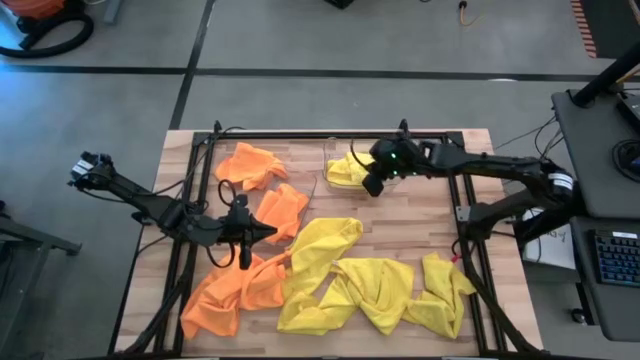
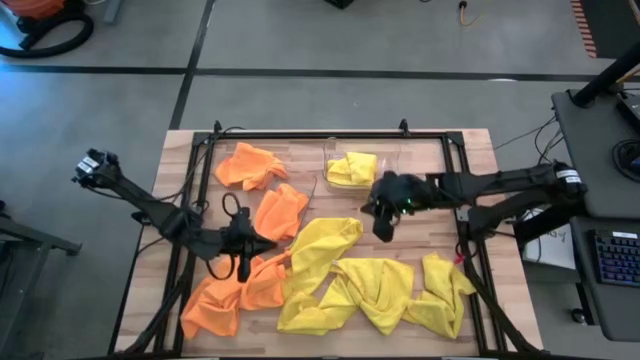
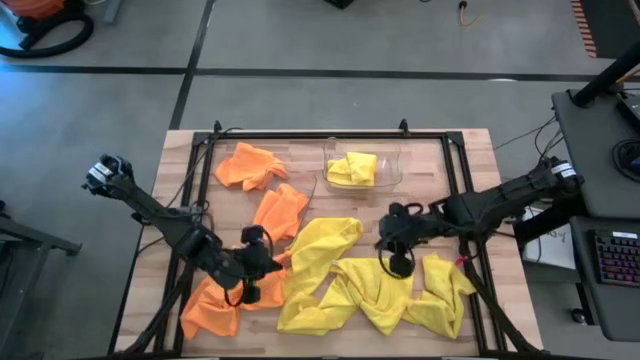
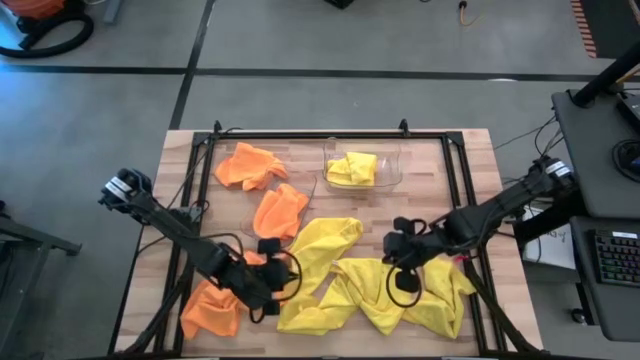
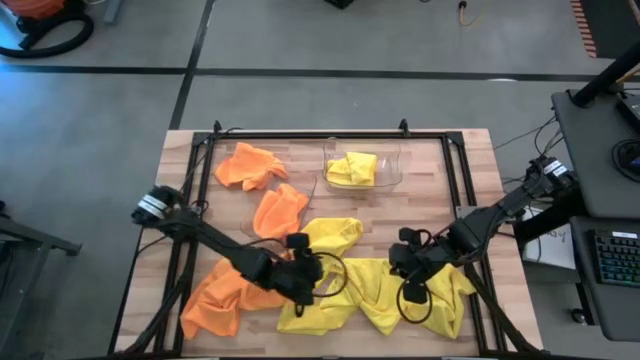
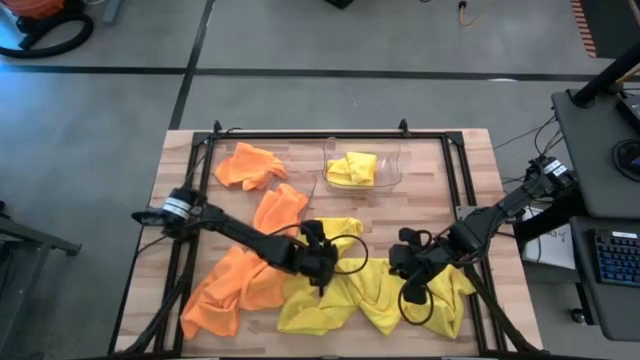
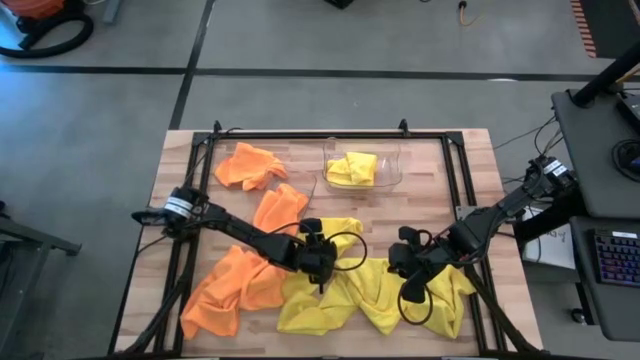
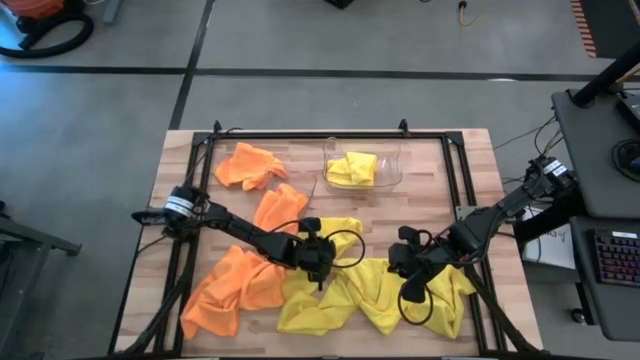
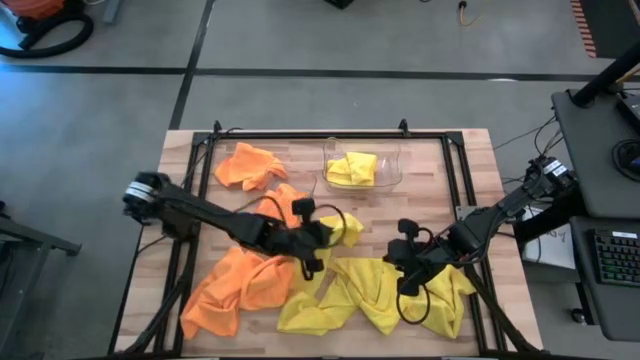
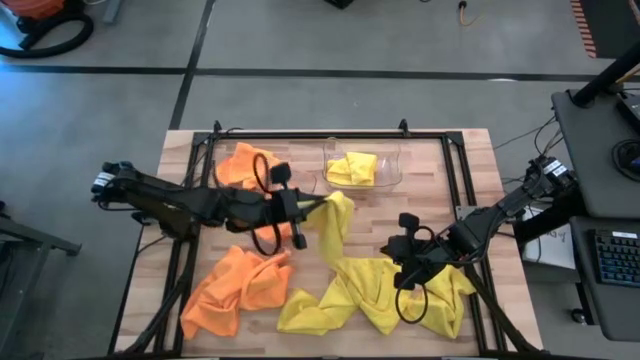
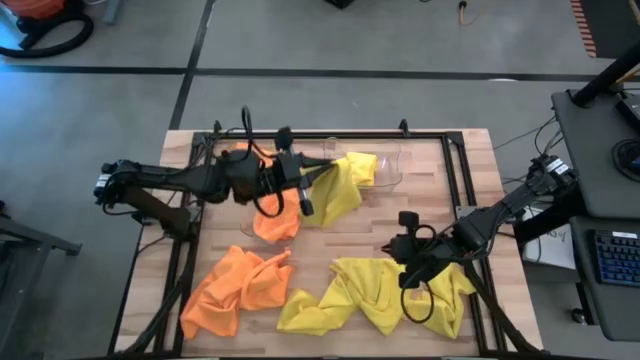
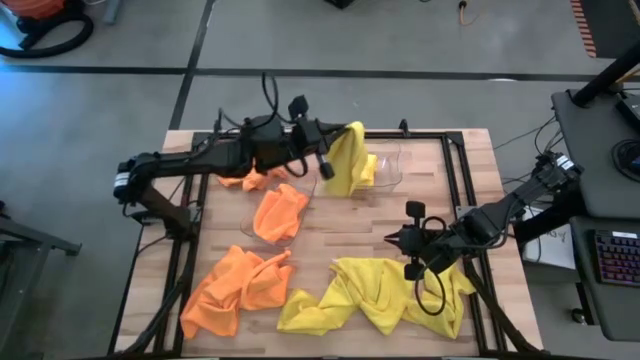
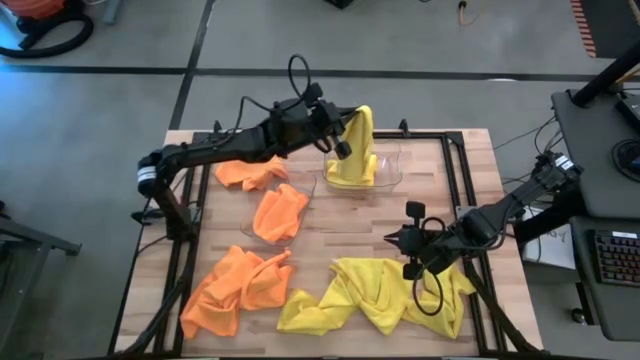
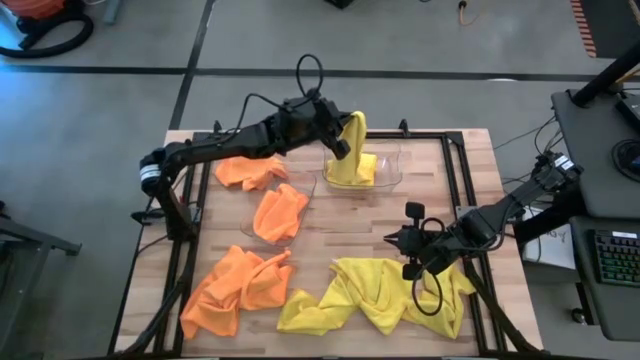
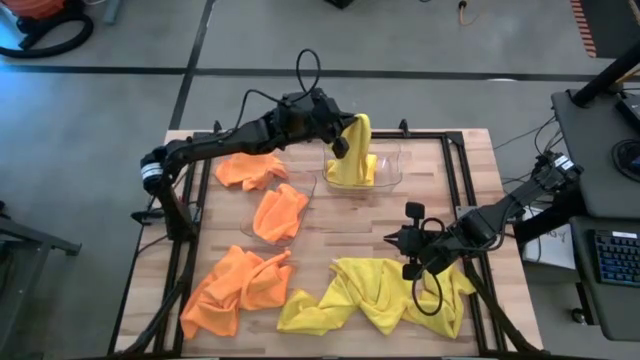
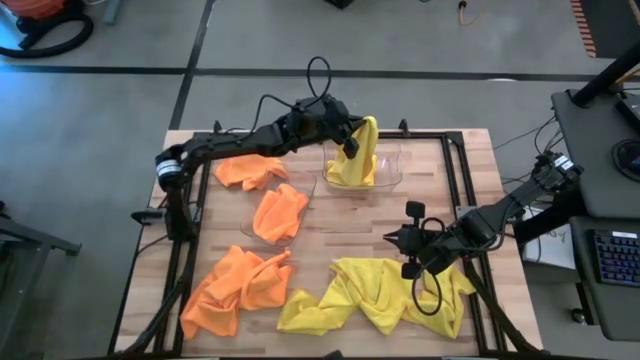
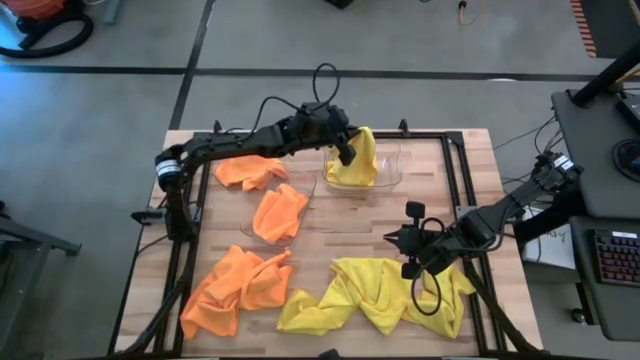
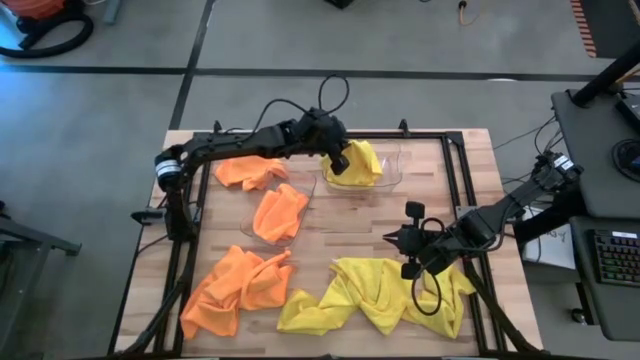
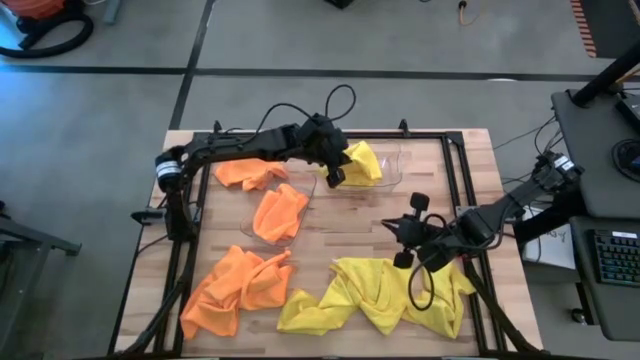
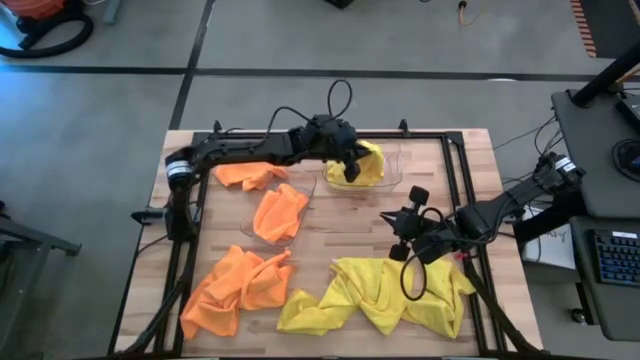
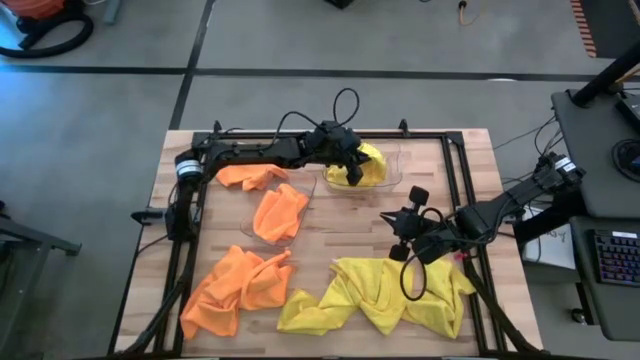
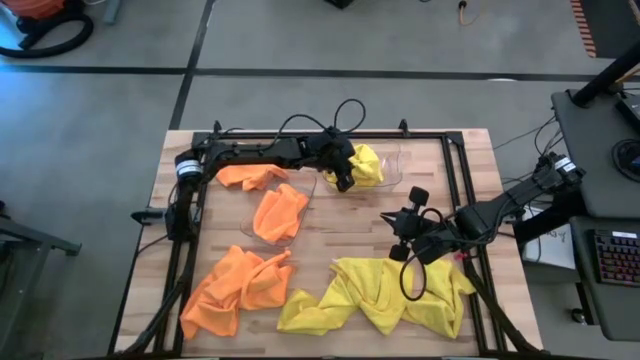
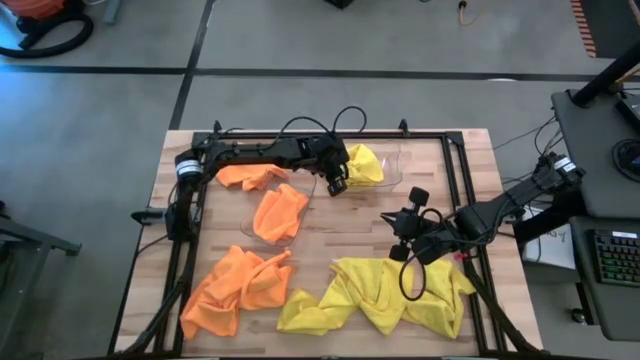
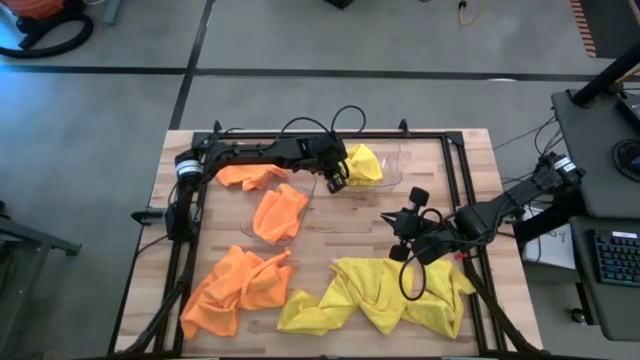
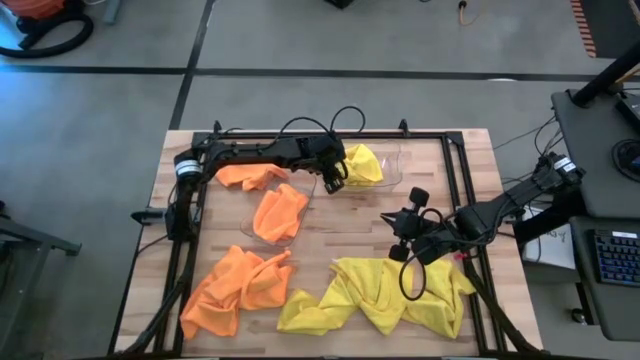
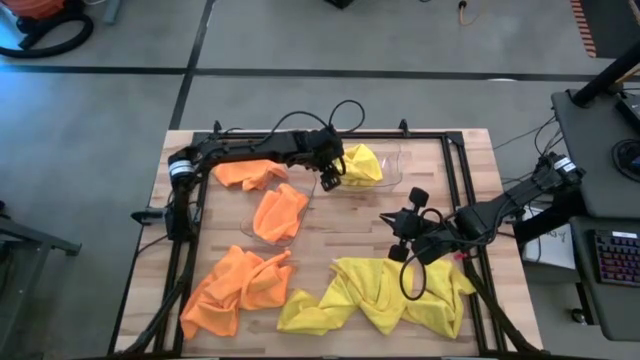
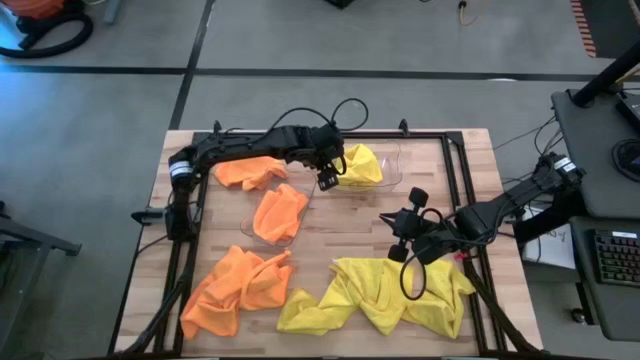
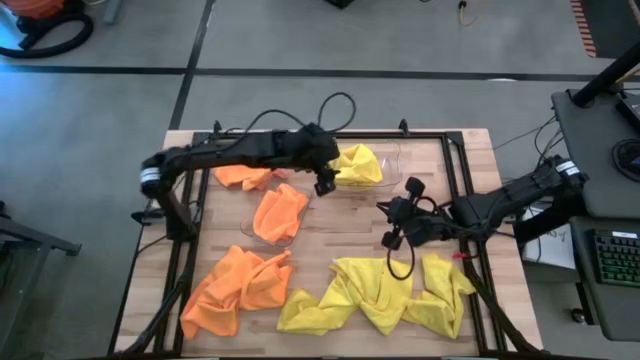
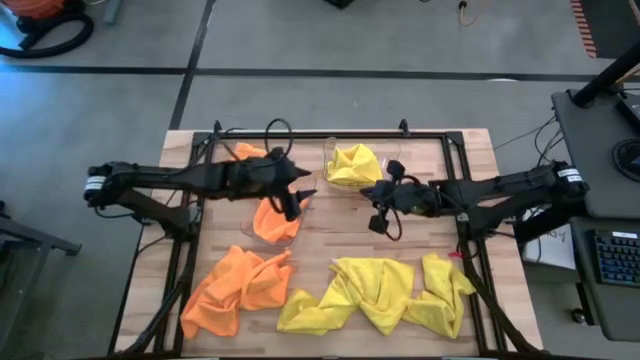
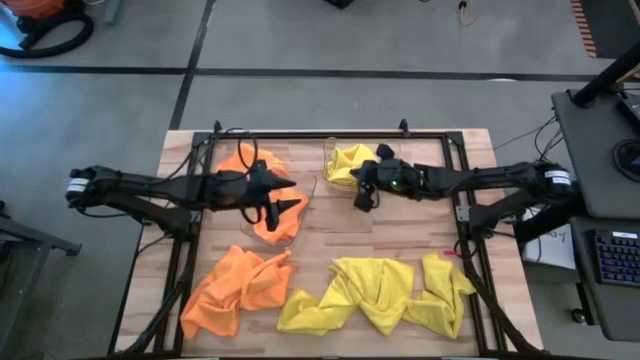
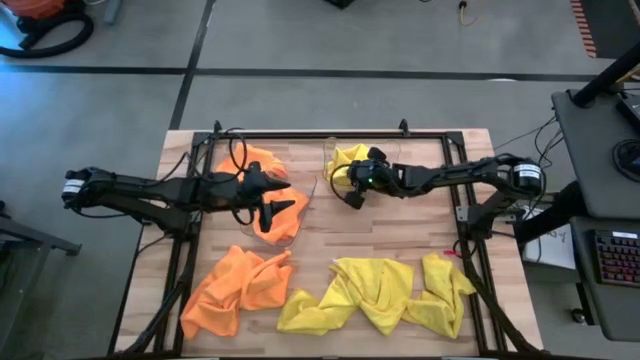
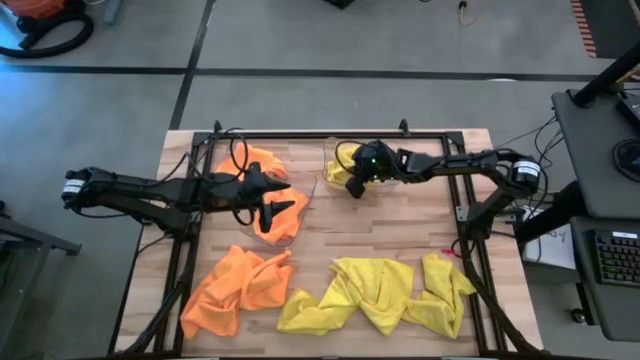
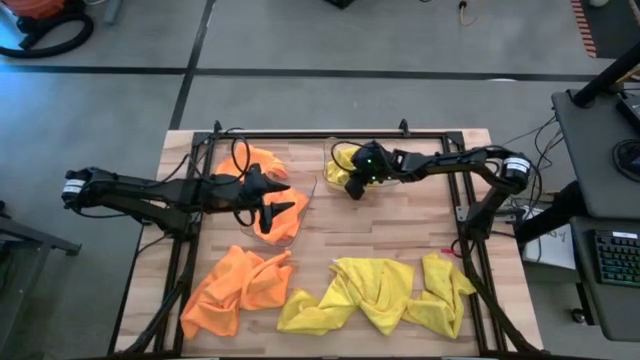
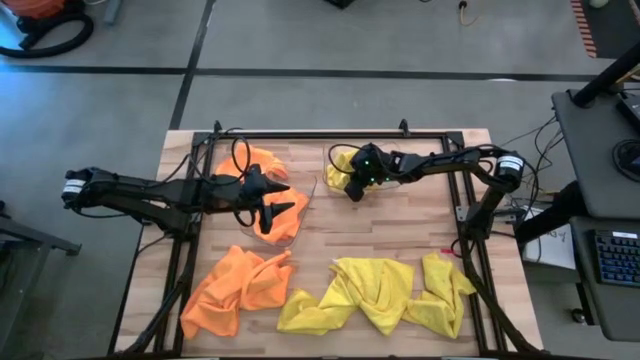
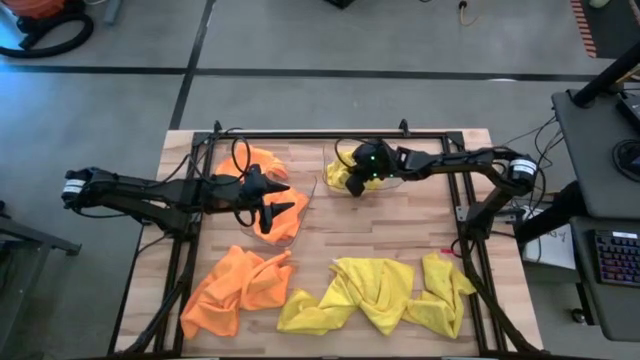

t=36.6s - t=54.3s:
Task: Sort microfiber towel by color & place in baskets
Put the yellow microfiber towel into the right transparent bin

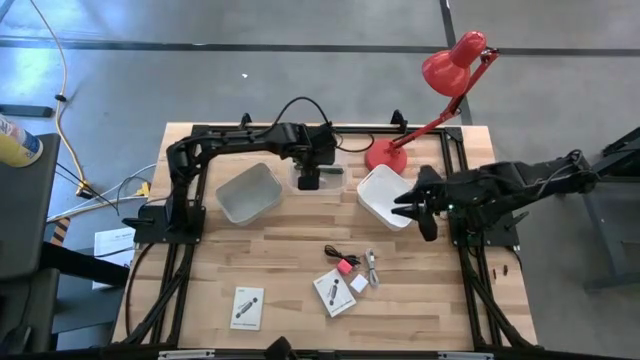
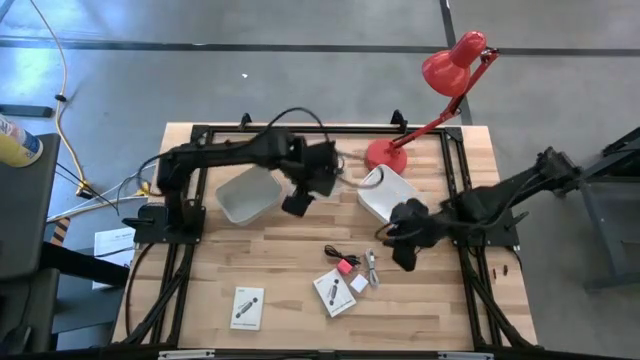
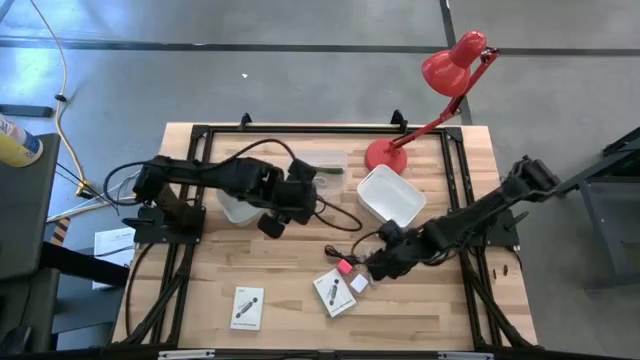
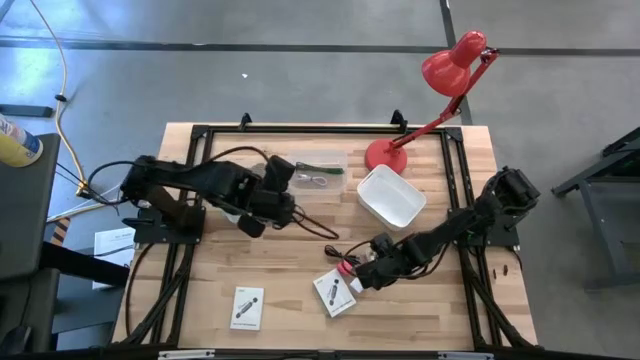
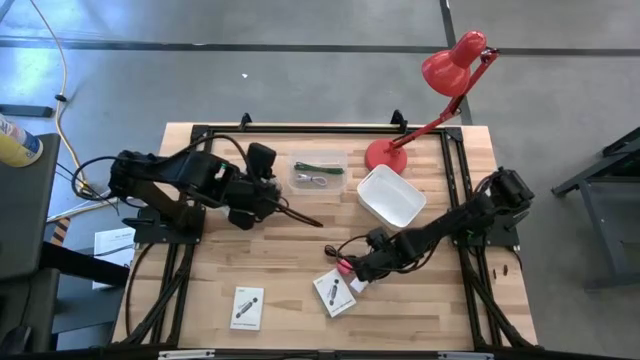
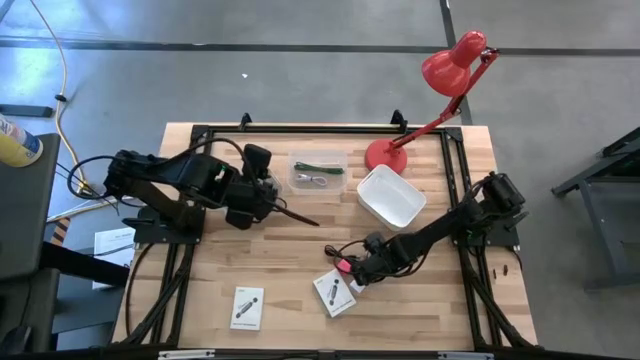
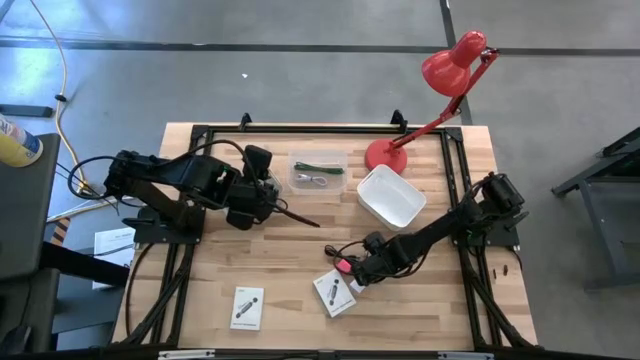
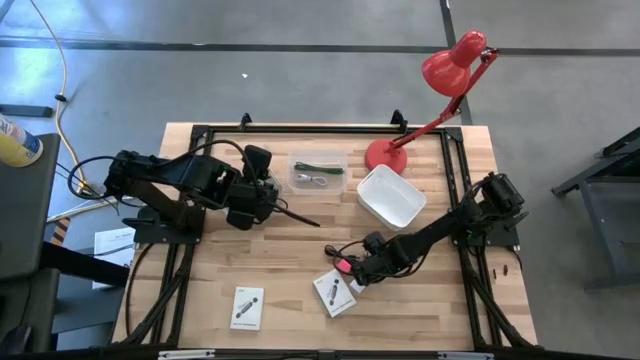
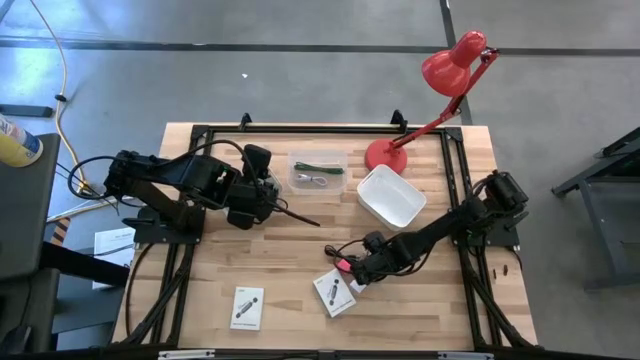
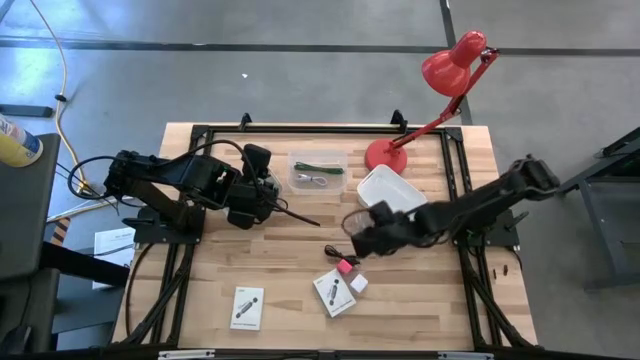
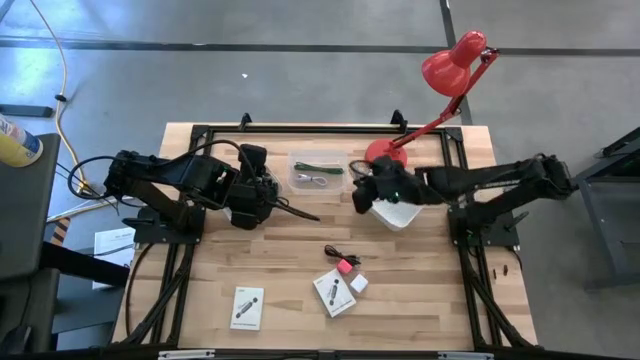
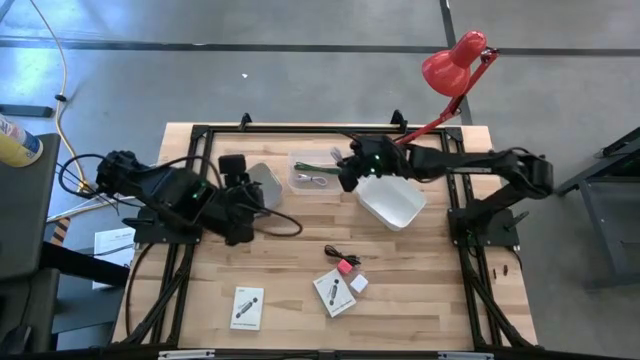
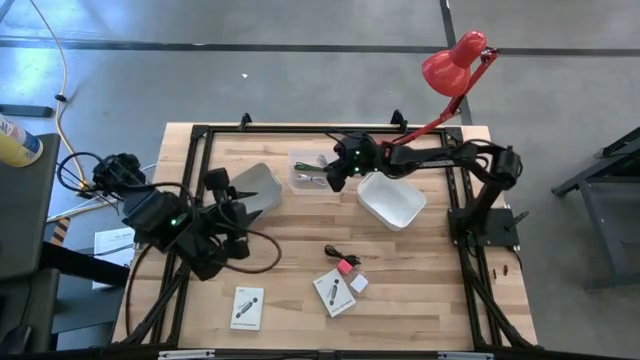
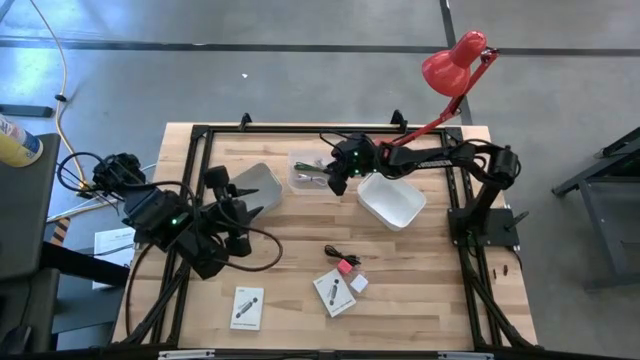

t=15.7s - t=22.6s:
Task: Pick and place items into bin
Put the white charger cable into the transparent bin
